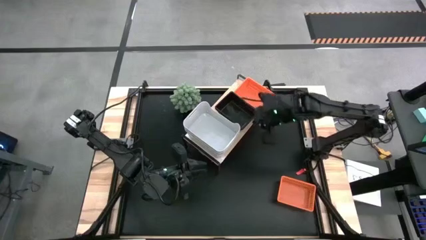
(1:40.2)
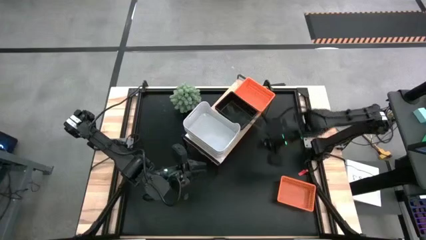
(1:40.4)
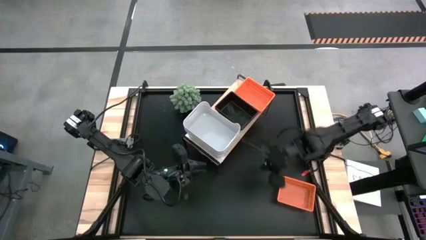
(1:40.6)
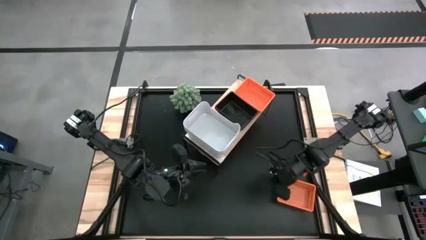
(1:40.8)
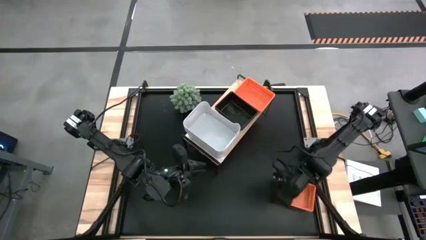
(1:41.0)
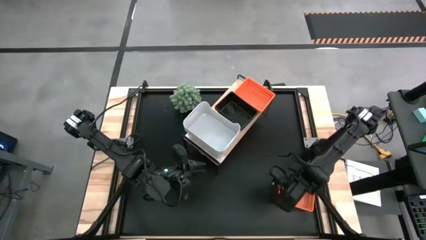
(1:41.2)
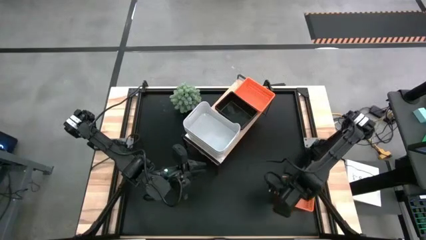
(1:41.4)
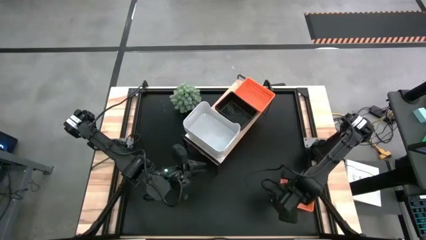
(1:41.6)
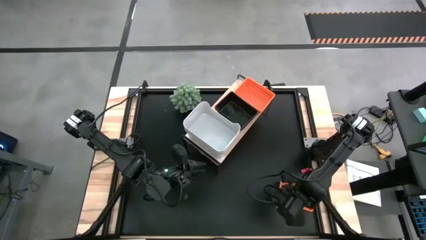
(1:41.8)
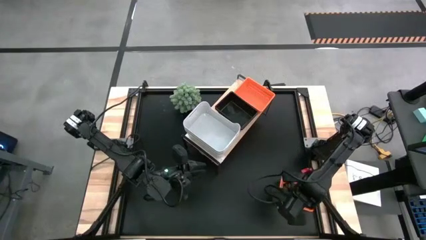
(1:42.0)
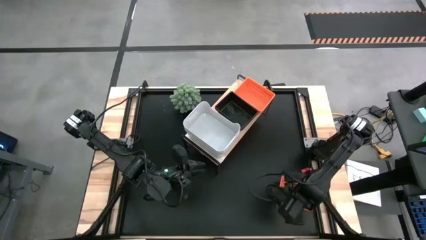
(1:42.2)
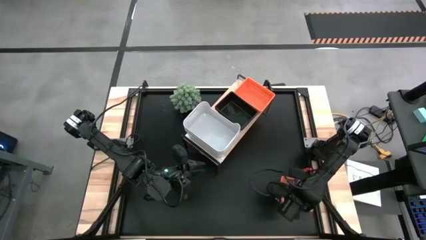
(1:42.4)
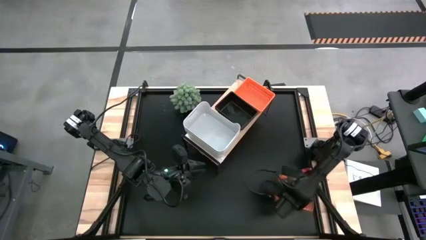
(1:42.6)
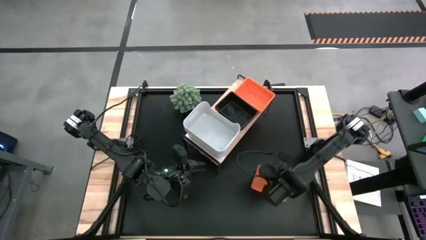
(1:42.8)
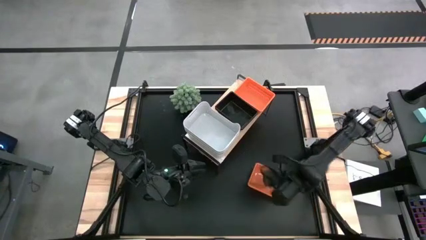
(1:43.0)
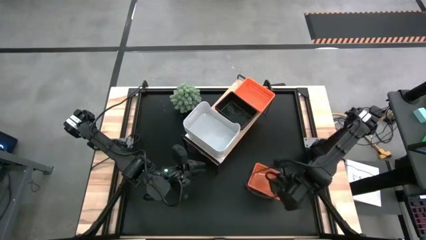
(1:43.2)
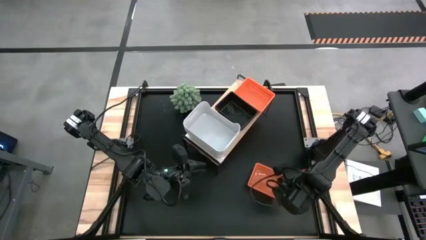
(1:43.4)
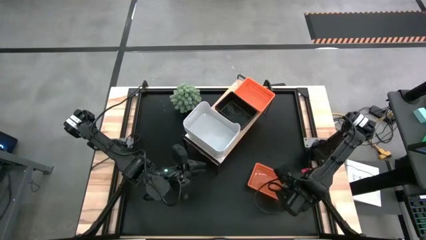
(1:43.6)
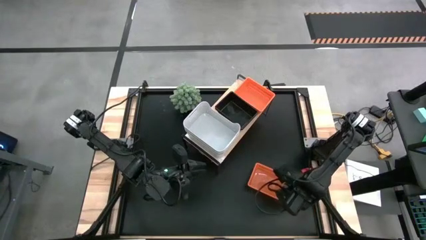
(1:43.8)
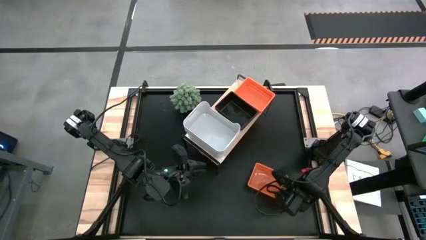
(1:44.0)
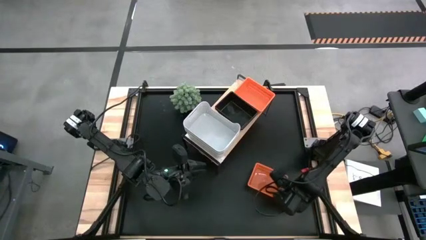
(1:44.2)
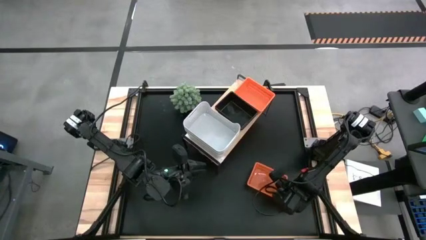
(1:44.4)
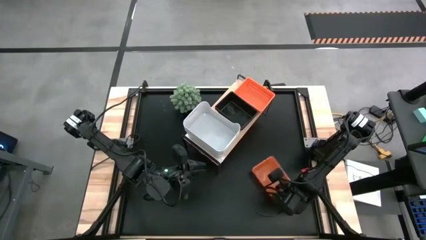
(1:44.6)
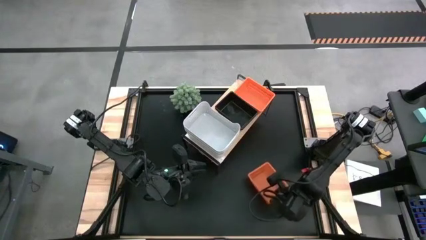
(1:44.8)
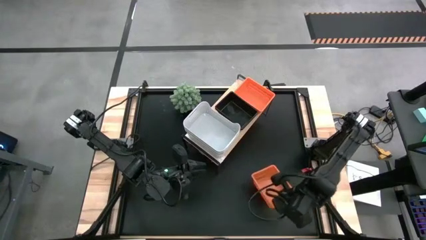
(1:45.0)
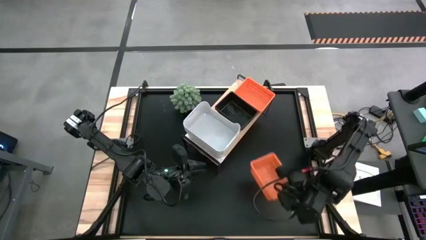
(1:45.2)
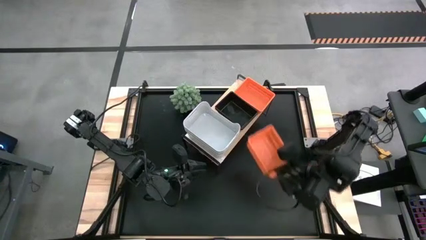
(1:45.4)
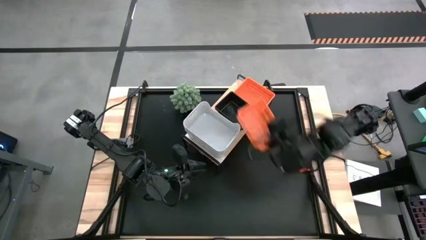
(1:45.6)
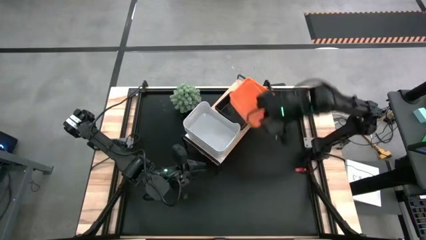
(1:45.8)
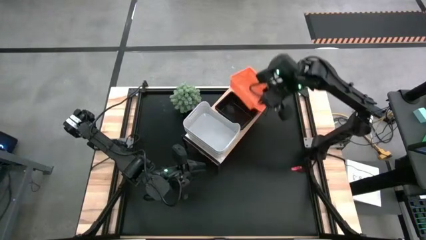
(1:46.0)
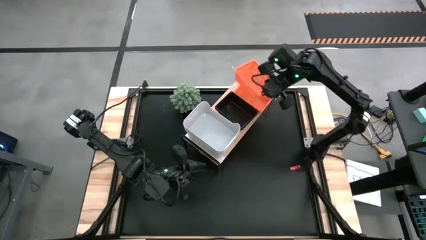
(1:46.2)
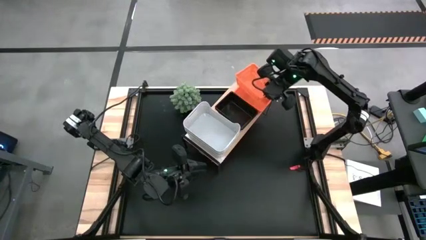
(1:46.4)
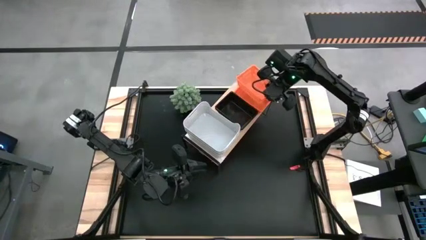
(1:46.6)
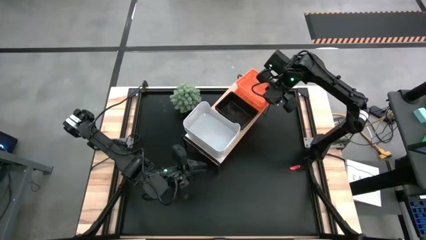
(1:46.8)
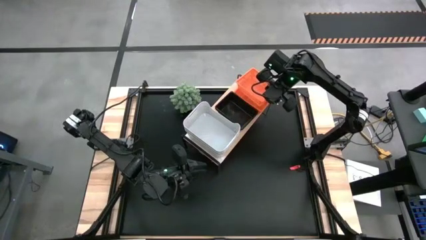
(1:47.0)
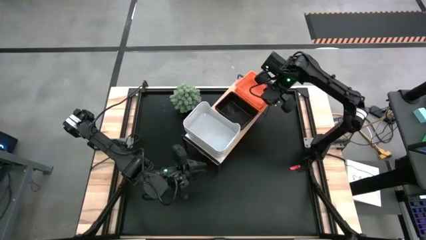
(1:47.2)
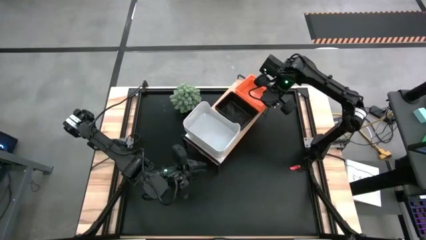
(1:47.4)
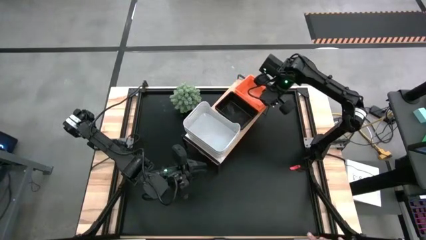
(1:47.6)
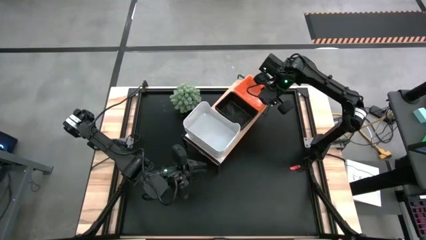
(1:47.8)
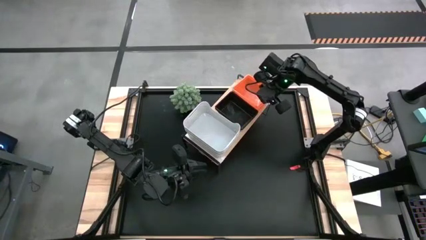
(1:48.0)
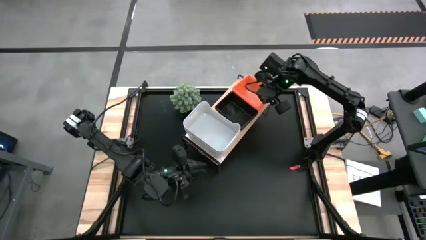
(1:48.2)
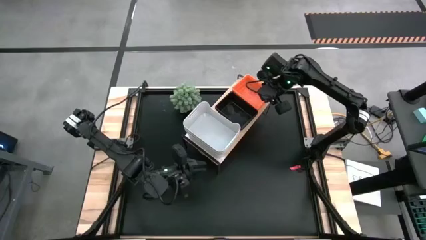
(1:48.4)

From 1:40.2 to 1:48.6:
Task: Stack baskets on shelf by color
Stack the orange bin on top of the other orange bin on the shelf

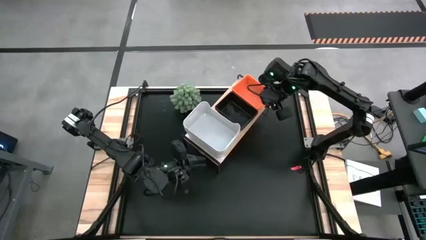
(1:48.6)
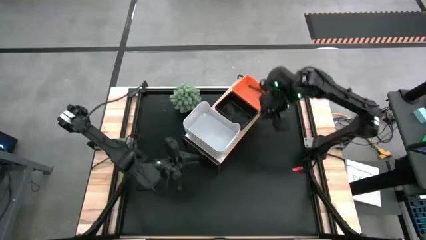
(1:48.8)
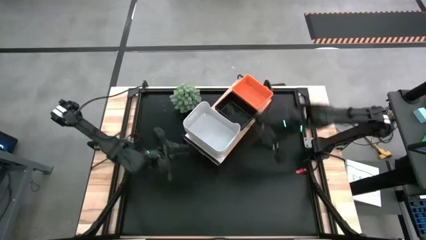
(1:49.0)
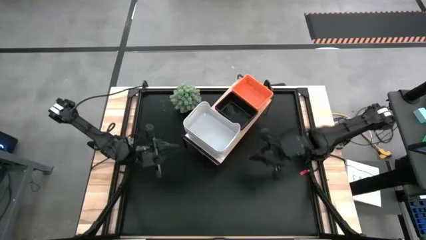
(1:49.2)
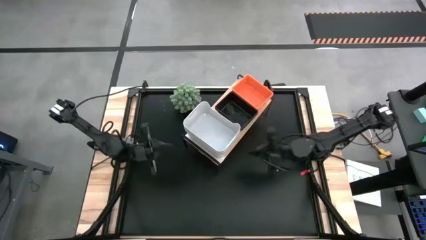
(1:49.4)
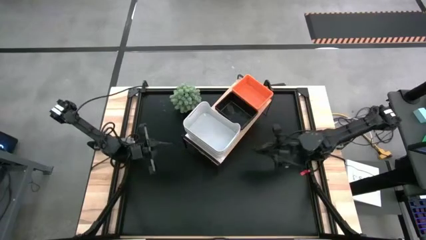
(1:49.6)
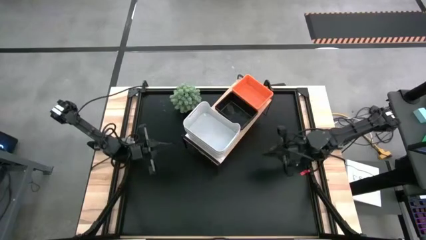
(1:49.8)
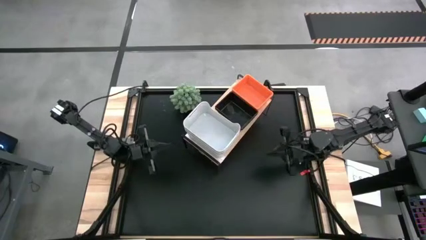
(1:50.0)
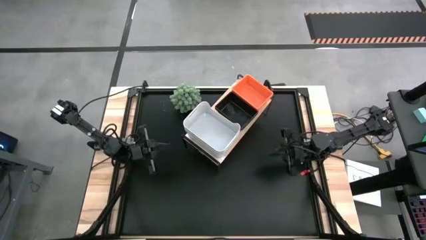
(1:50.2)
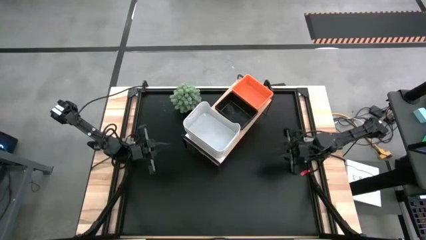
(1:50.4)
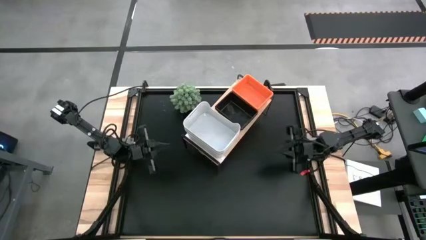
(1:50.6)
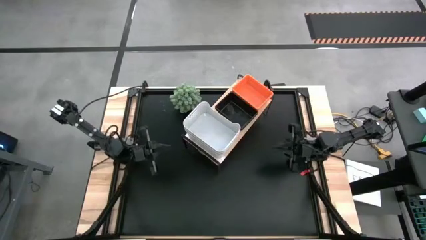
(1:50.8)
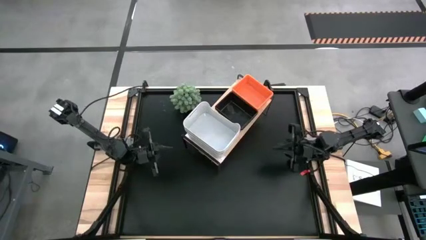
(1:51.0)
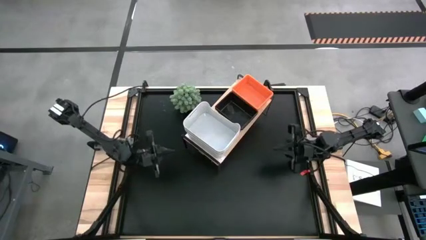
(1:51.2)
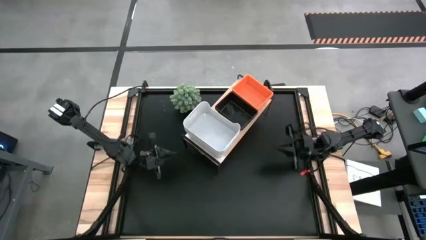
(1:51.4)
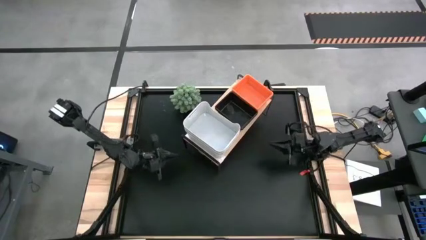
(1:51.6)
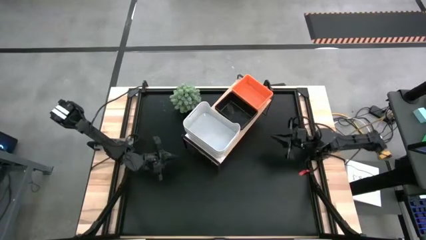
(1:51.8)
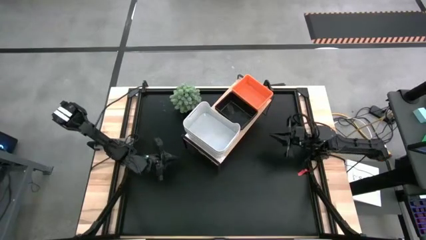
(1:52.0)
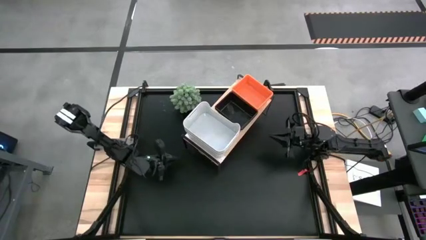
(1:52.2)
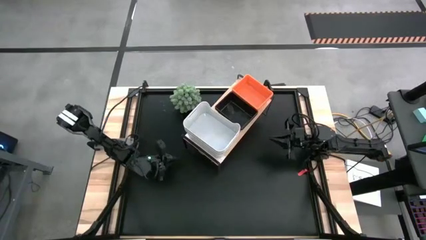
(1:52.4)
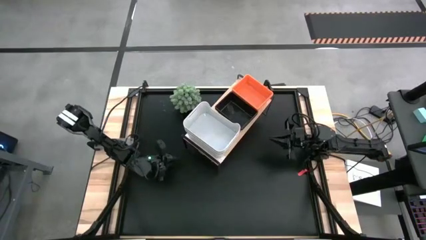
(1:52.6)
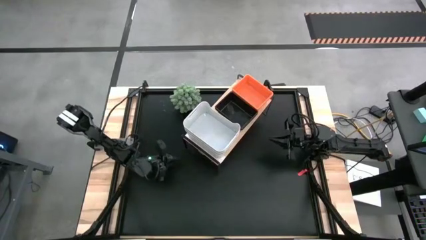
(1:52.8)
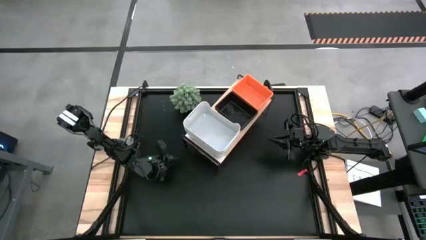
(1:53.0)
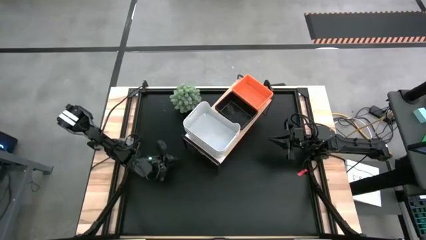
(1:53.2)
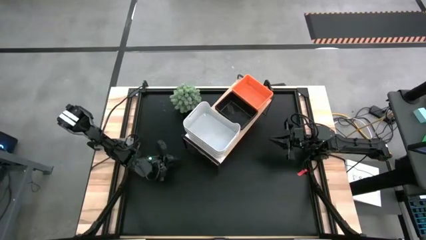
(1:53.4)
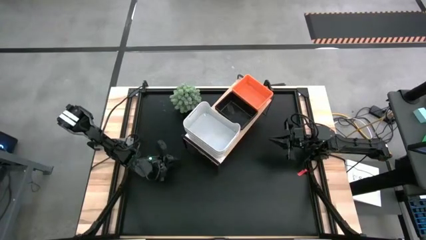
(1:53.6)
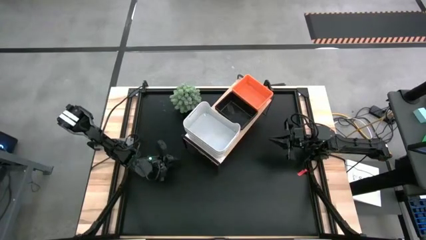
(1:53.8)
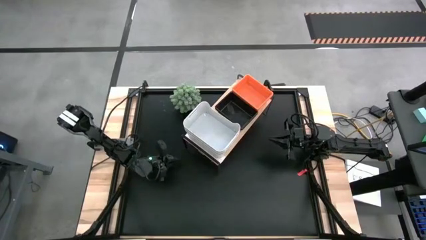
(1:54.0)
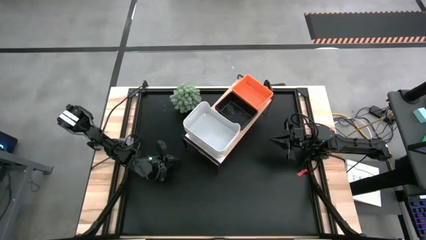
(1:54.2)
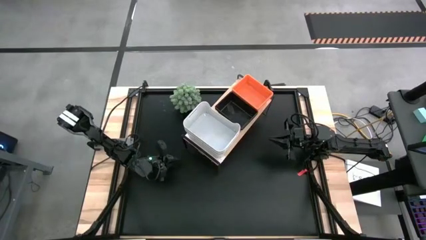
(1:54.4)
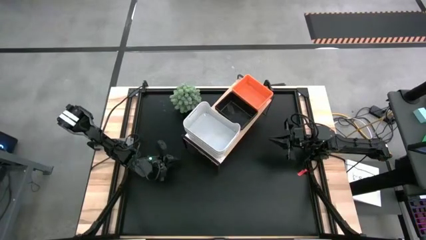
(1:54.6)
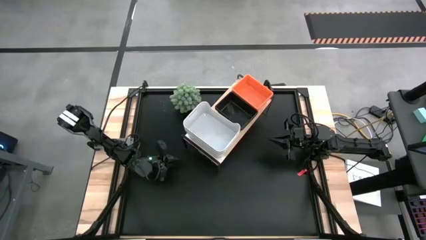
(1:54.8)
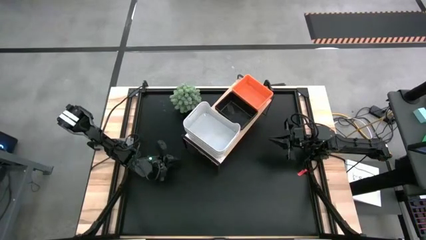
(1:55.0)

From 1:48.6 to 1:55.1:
Return to Home Position
